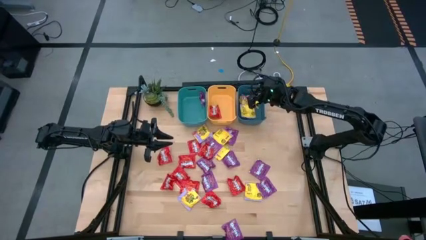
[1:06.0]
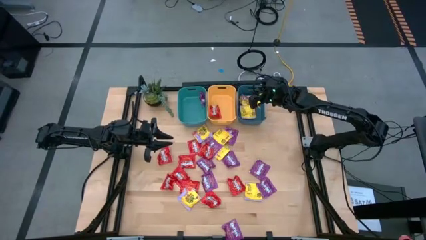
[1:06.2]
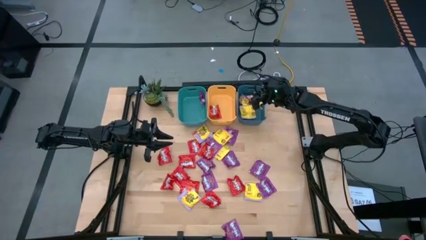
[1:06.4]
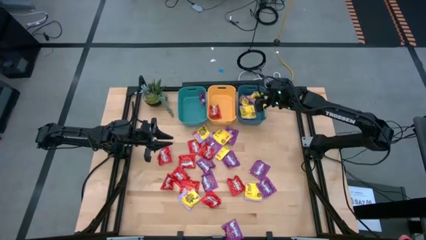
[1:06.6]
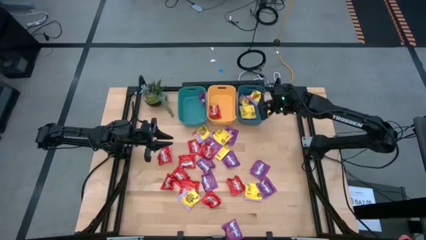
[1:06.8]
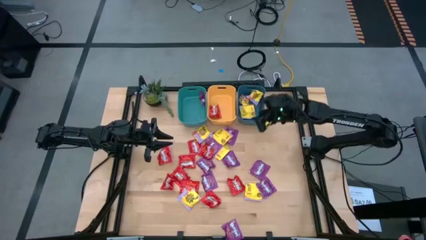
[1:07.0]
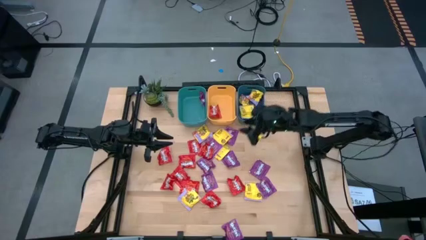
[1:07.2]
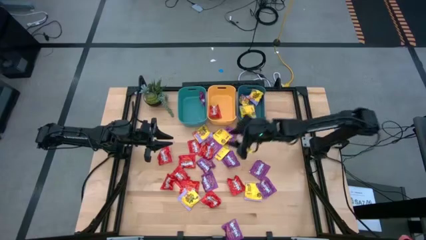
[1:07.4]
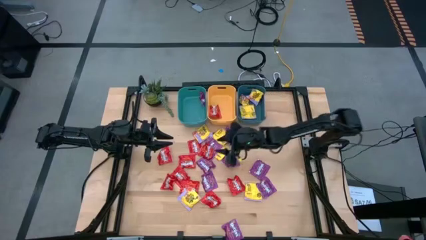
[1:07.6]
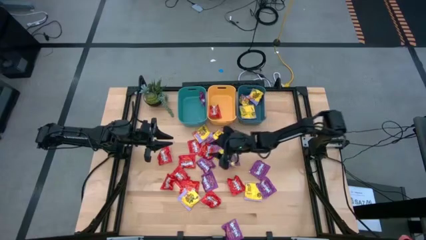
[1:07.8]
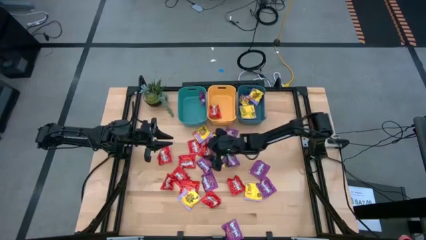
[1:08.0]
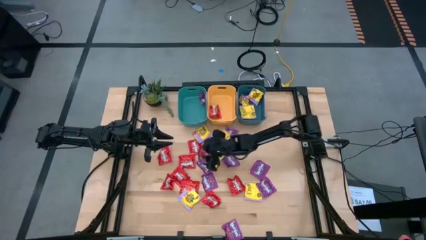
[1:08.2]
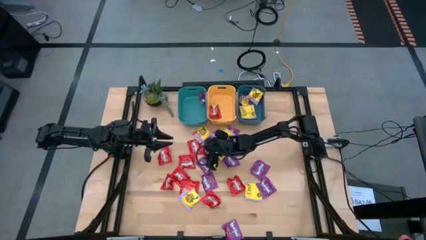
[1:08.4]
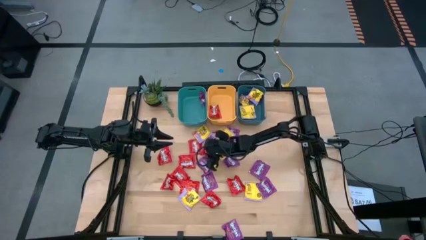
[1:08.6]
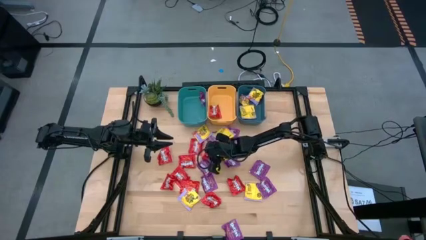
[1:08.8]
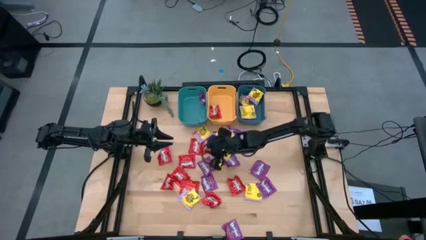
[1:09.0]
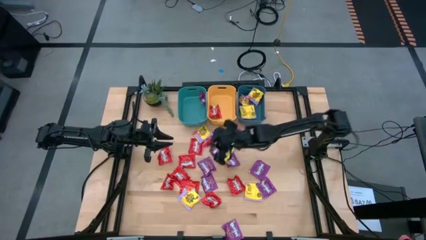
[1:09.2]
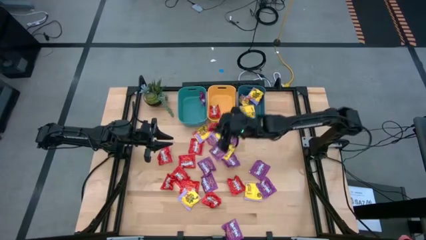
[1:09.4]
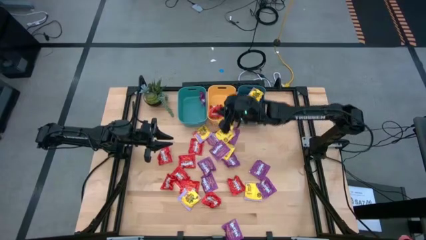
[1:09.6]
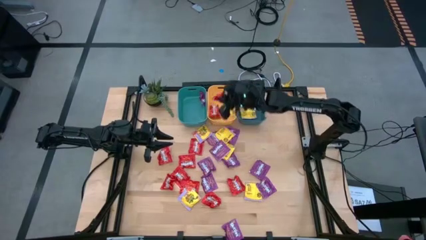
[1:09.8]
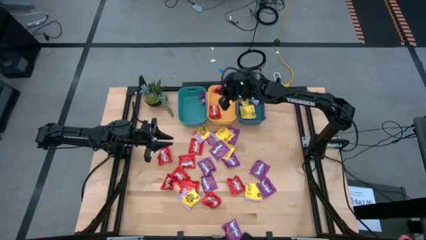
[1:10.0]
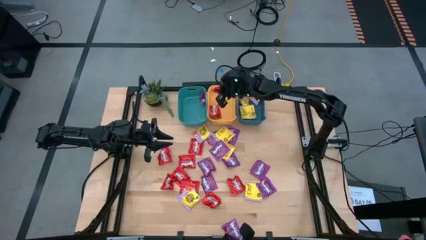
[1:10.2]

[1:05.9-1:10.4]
Task: Sort candy
Put the red candy into the yellow bin

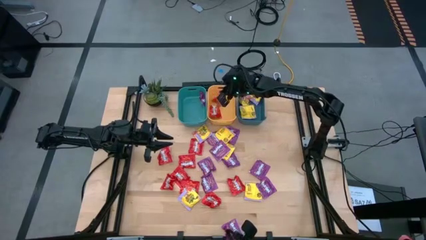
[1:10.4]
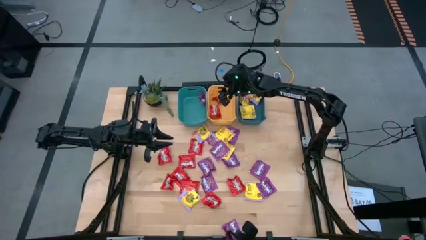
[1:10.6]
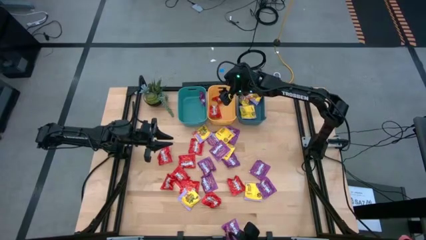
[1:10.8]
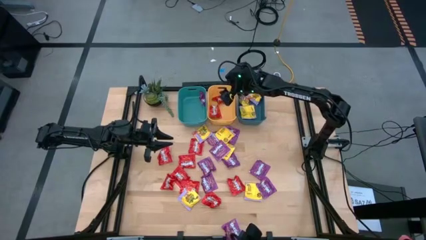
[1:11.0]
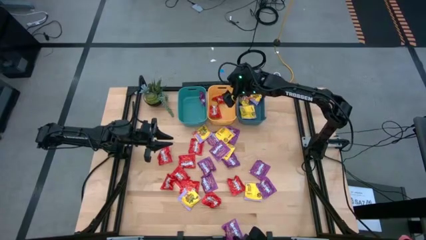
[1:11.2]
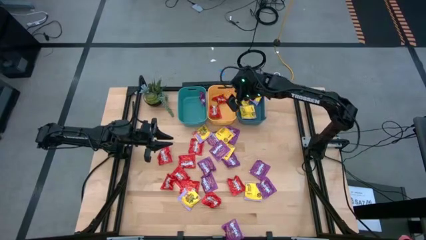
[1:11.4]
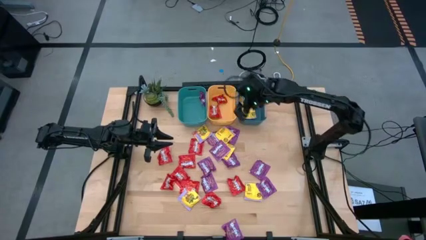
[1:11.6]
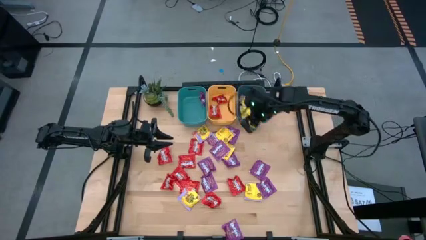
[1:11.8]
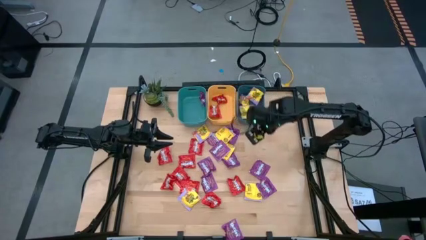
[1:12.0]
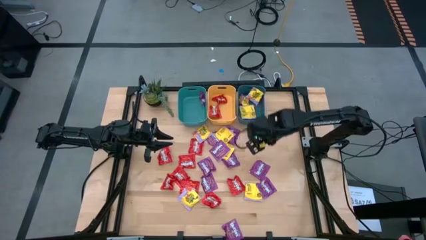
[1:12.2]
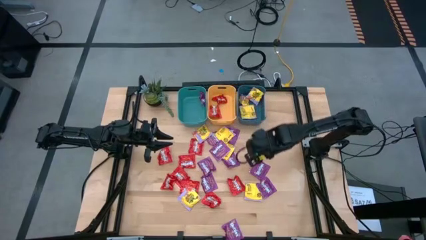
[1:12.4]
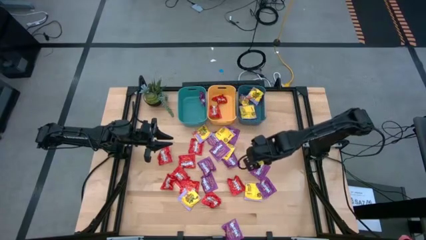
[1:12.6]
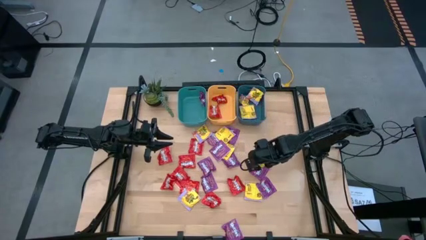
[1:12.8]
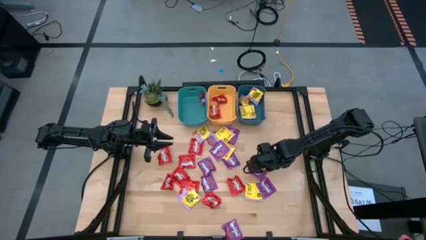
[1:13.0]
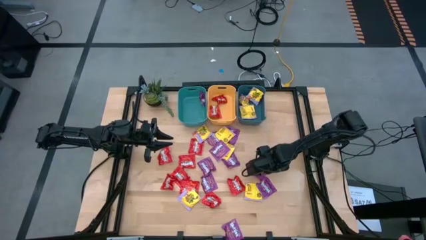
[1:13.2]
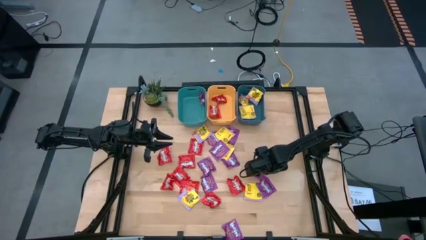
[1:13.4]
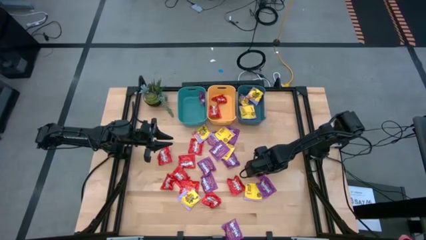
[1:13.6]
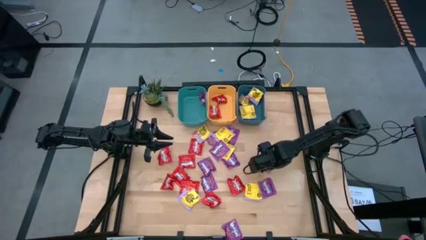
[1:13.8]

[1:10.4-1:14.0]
Put the violet candy into the blue bin

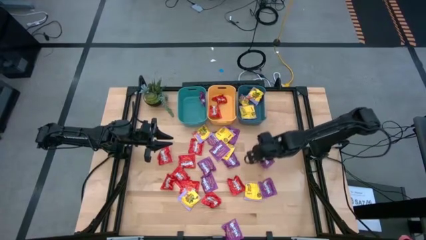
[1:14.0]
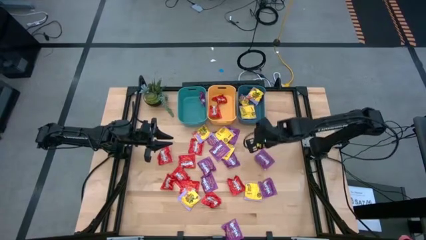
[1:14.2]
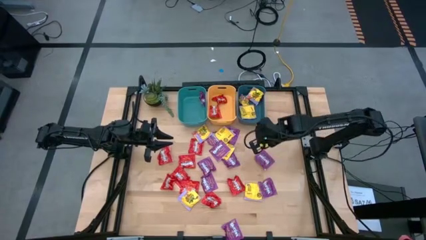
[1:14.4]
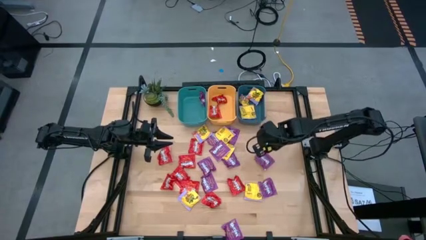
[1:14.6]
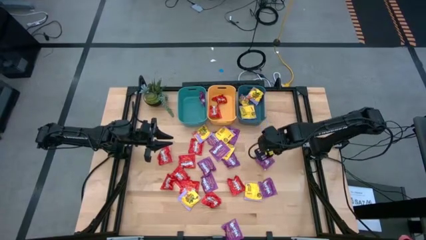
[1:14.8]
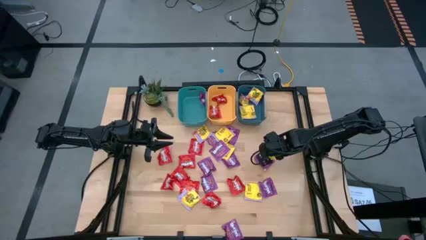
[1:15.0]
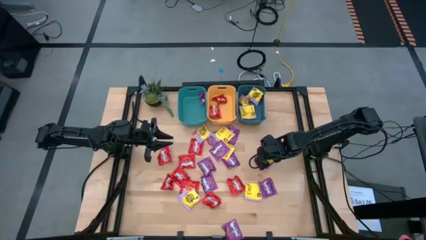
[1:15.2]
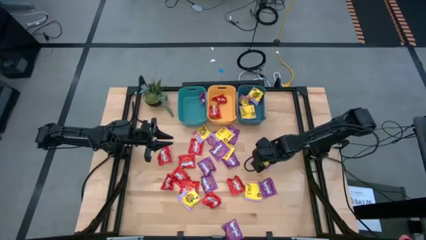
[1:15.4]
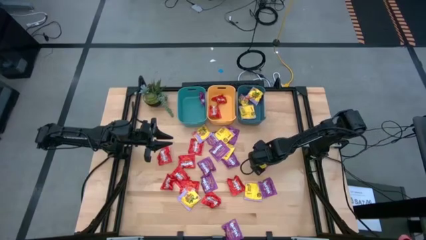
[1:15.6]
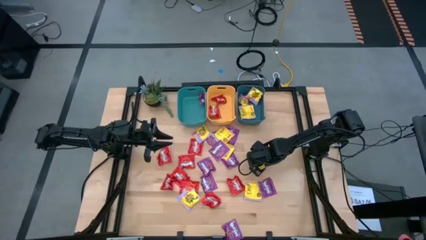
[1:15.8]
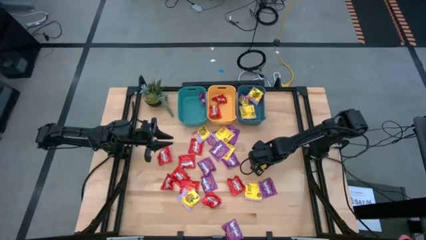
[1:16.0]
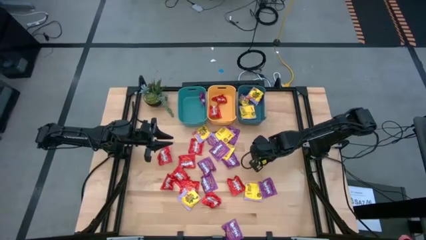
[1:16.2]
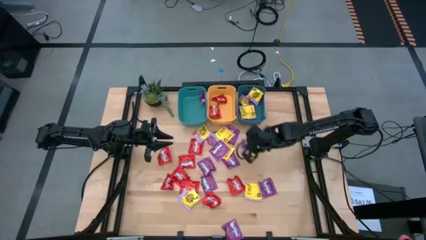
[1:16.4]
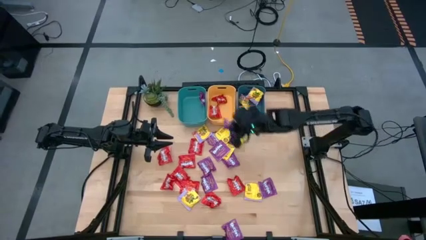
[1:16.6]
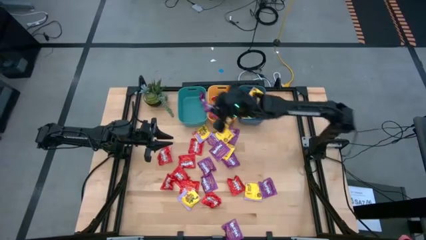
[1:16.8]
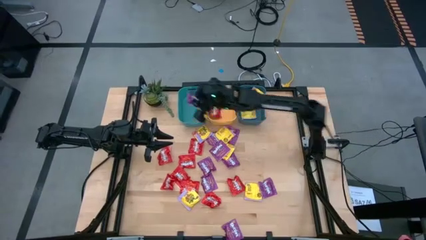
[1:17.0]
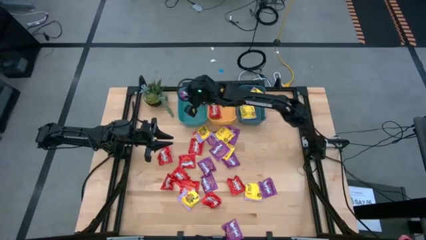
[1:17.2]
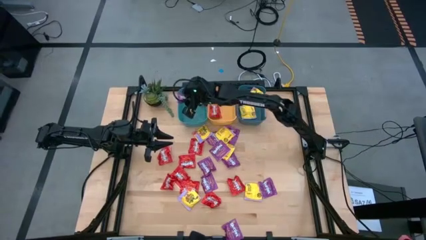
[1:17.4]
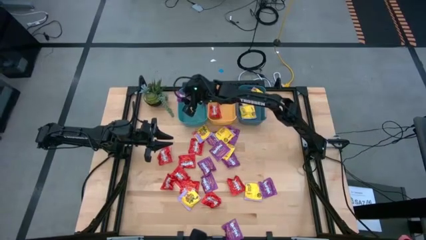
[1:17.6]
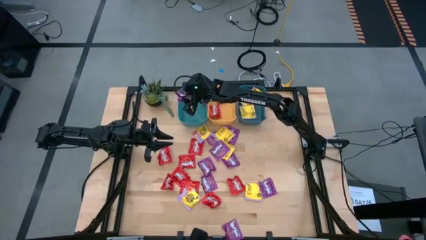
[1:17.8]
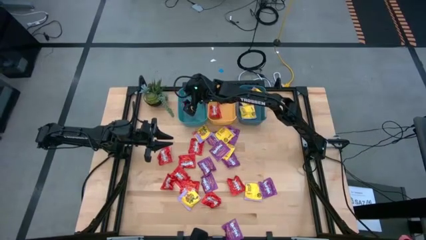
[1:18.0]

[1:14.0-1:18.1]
Put the violet candy into the blue bin

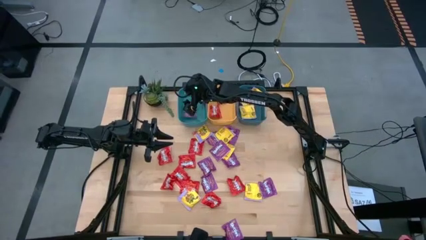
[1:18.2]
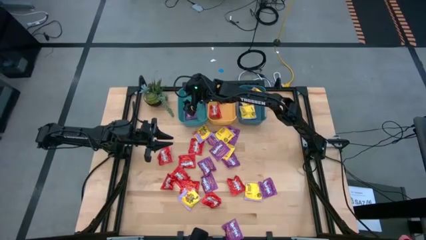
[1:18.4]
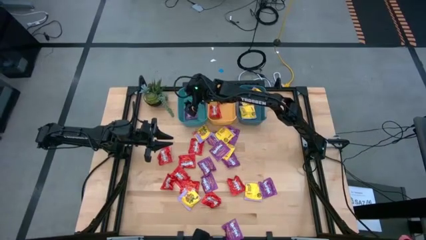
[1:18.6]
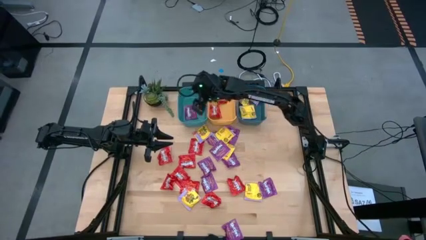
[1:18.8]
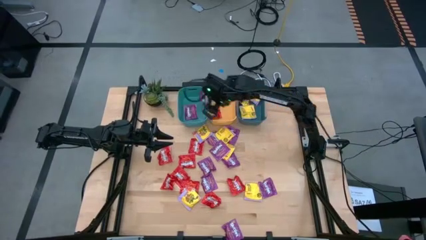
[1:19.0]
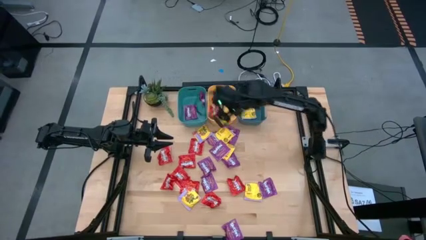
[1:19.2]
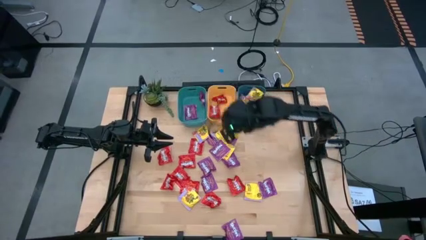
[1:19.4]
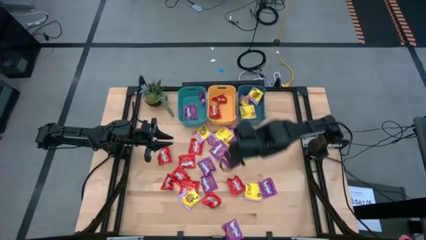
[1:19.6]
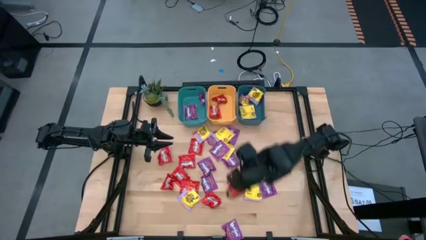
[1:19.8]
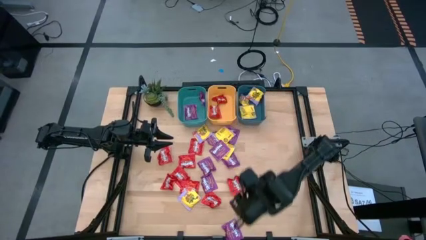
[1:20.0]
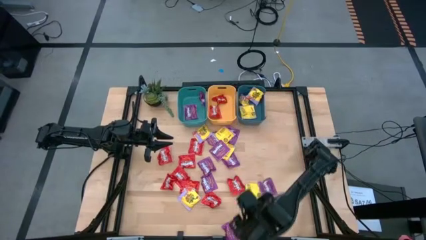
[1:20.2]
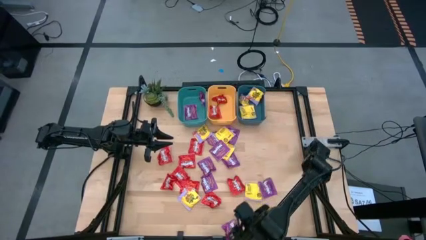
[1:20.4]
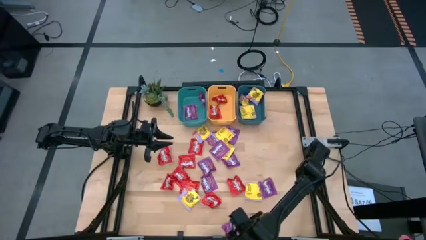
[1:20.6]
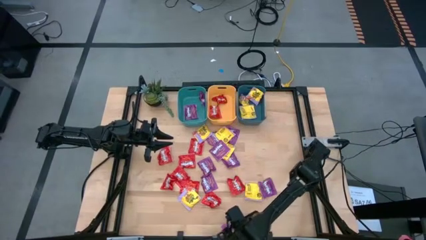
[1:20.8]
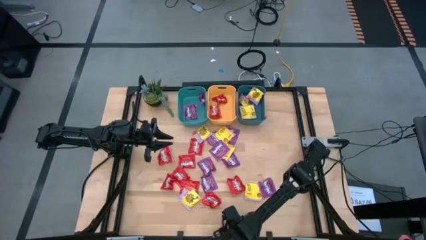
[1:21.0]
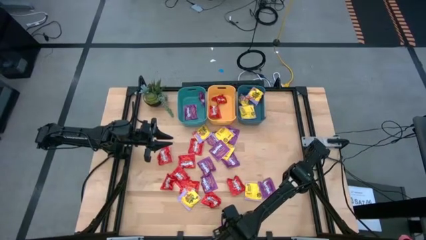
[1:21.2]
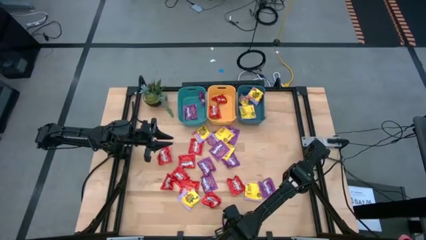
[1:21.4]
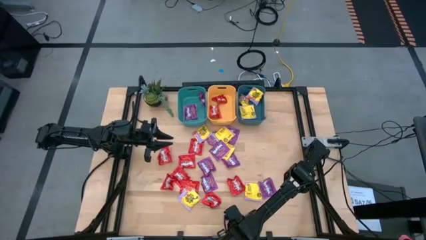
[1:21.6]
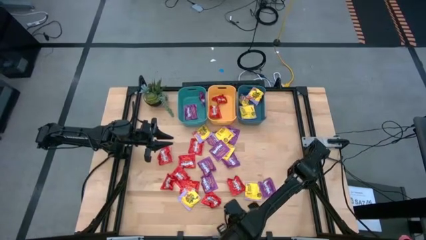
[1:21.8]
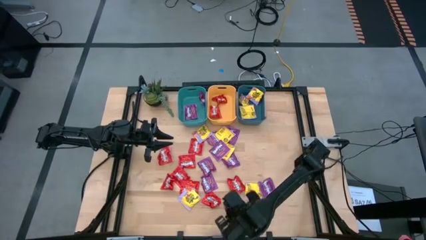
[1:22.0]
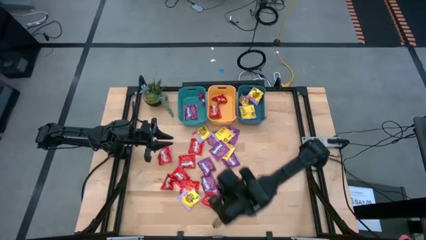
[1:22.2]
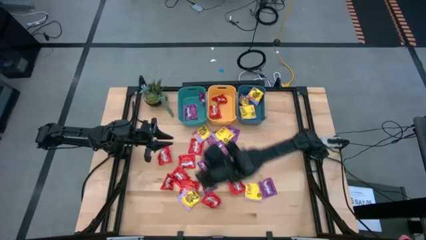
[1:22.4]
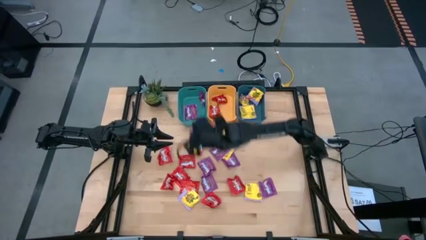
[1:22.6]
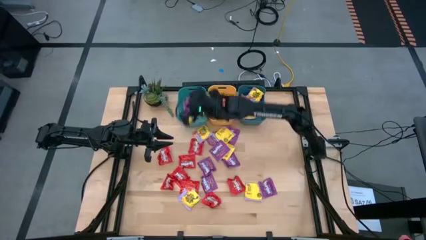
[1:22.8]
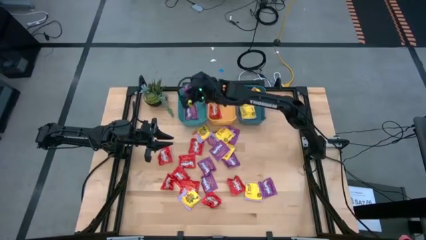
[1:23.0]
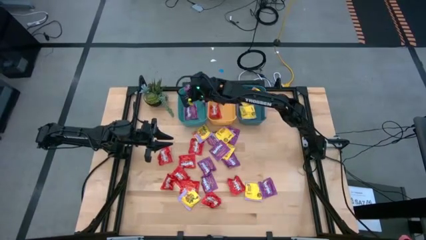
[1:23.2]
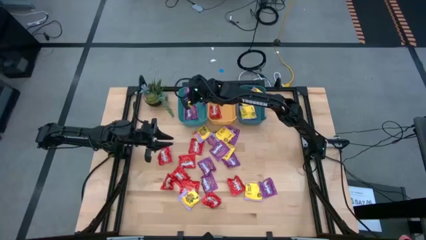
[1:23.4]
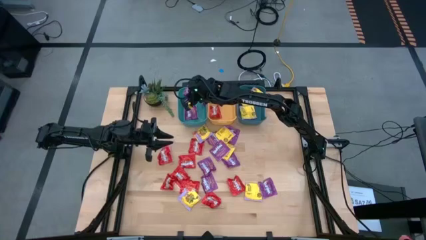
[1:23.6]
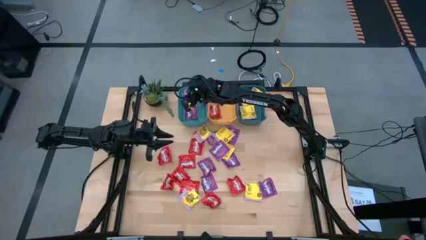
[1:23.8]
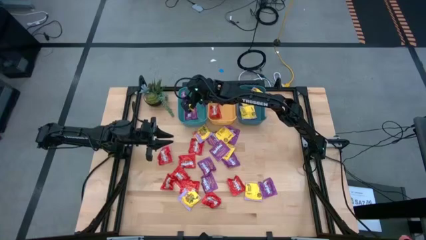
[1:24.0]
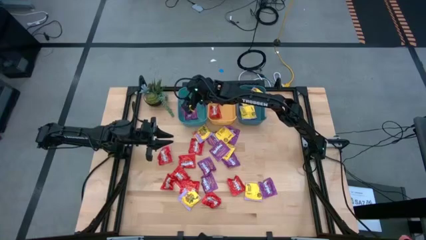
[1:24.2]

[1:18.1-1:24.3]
Put the violet candy into the blue bin
